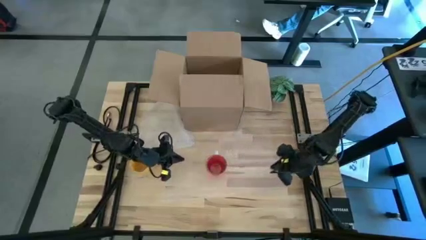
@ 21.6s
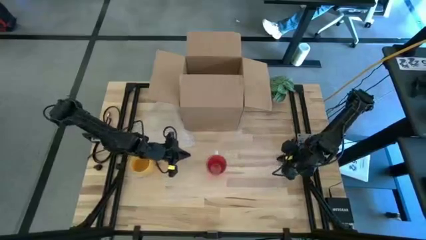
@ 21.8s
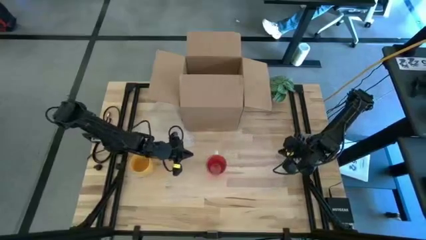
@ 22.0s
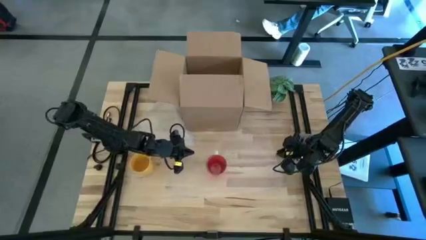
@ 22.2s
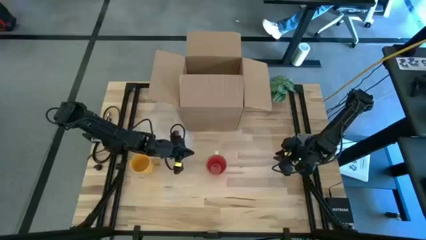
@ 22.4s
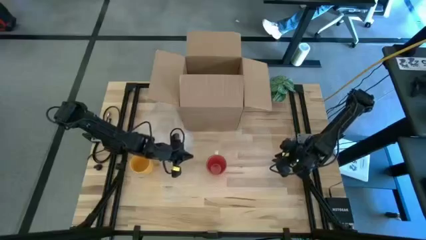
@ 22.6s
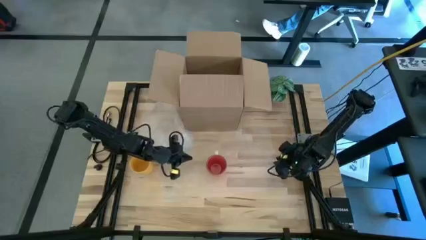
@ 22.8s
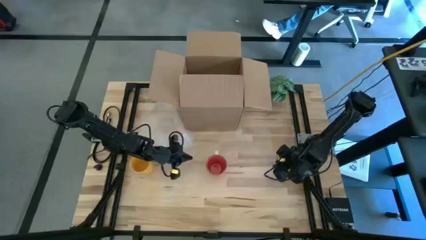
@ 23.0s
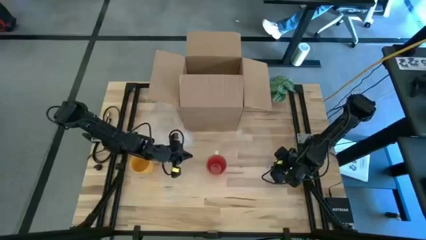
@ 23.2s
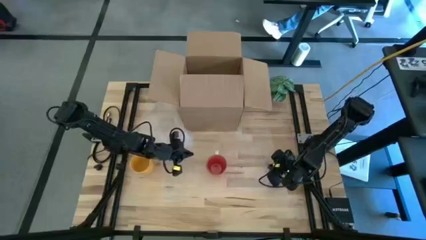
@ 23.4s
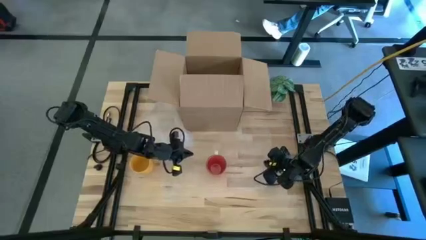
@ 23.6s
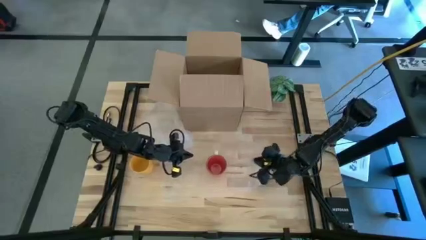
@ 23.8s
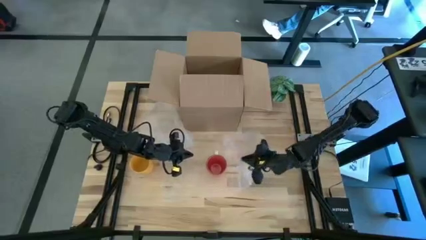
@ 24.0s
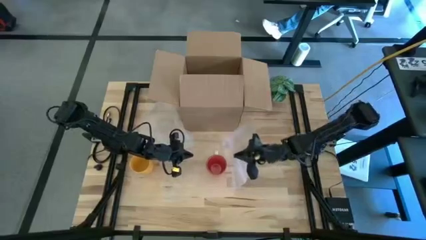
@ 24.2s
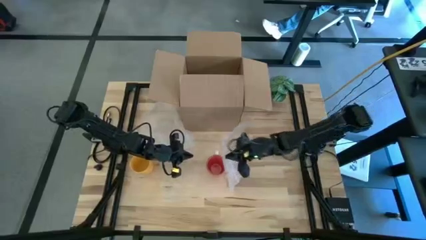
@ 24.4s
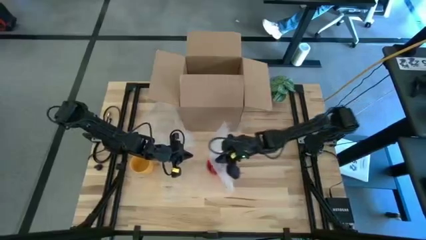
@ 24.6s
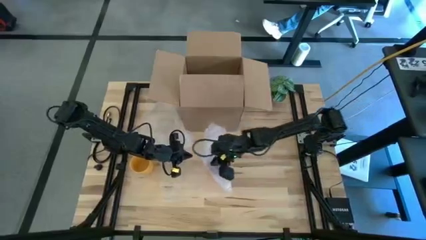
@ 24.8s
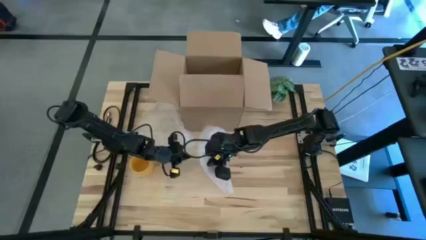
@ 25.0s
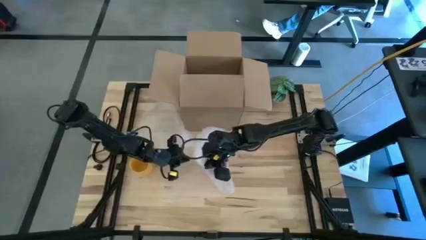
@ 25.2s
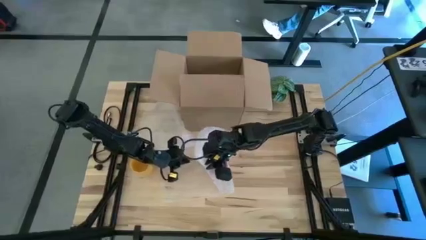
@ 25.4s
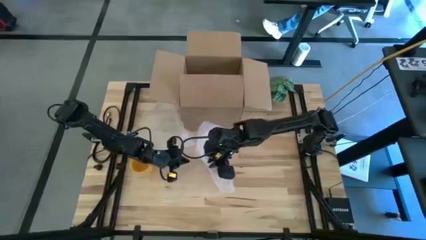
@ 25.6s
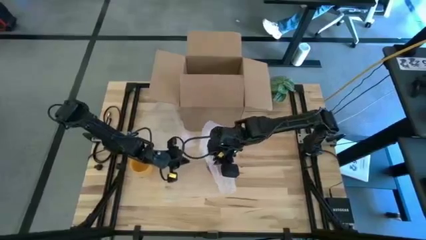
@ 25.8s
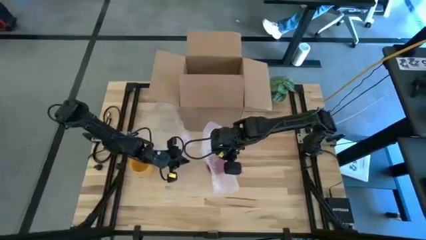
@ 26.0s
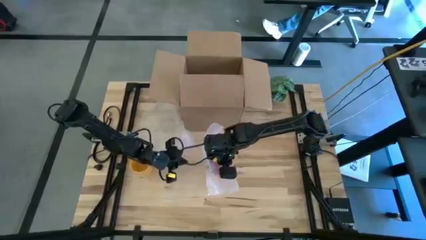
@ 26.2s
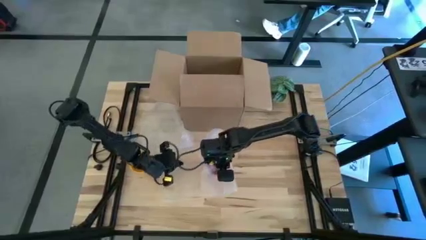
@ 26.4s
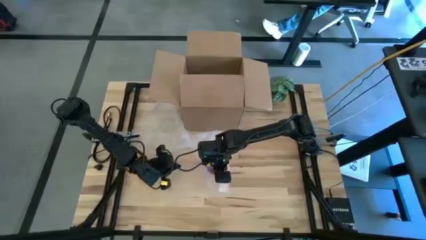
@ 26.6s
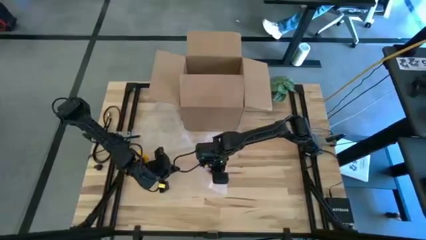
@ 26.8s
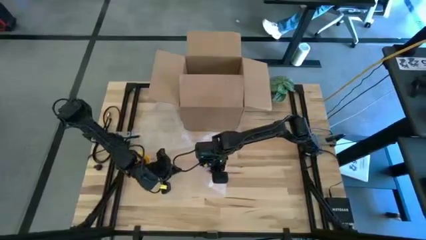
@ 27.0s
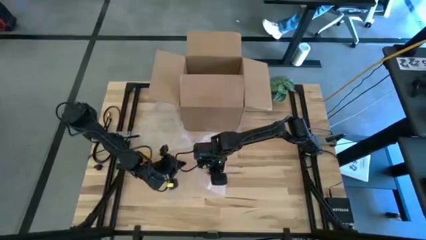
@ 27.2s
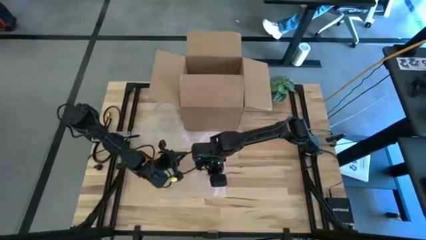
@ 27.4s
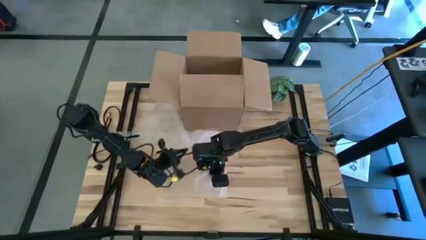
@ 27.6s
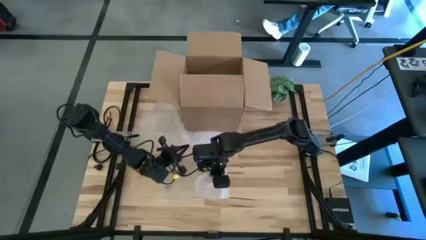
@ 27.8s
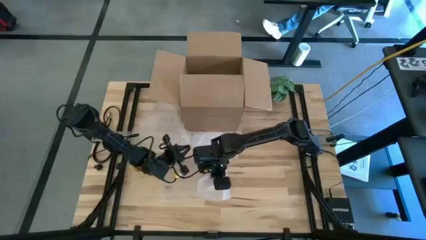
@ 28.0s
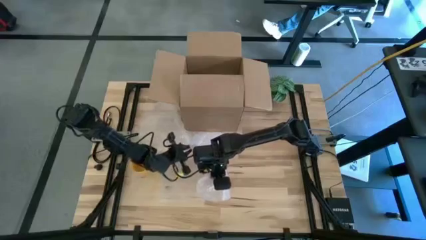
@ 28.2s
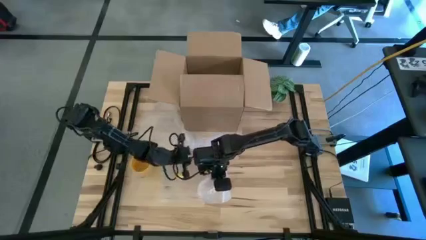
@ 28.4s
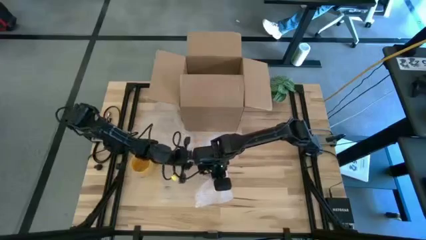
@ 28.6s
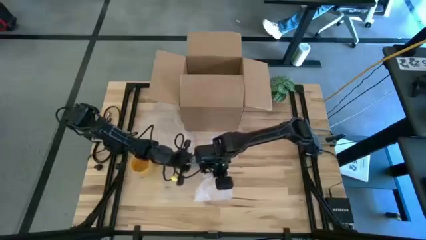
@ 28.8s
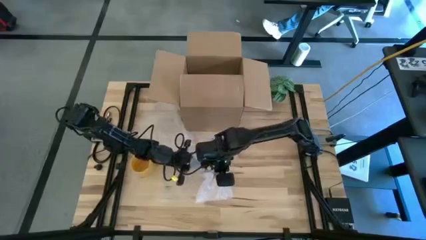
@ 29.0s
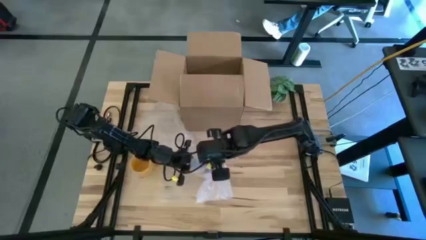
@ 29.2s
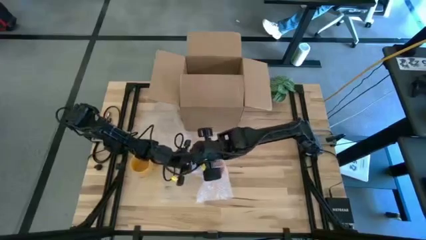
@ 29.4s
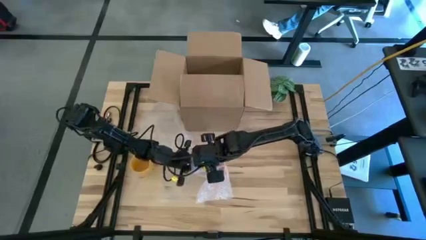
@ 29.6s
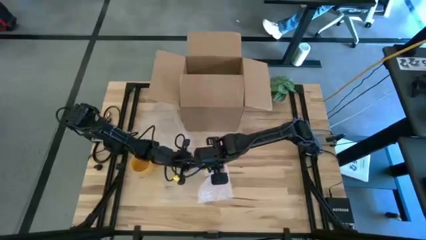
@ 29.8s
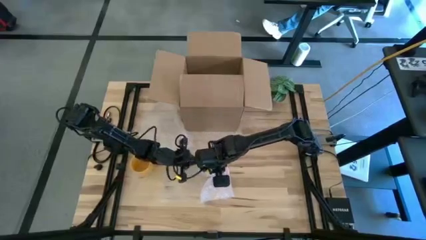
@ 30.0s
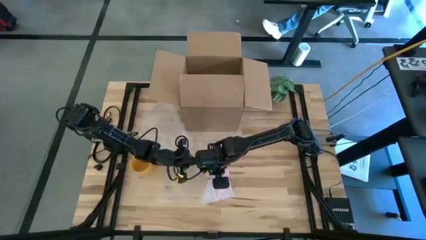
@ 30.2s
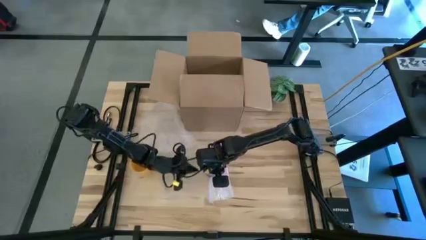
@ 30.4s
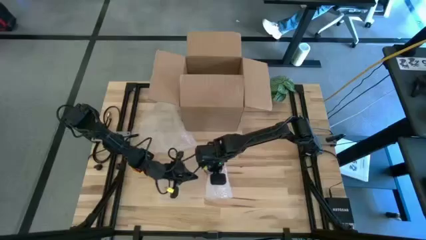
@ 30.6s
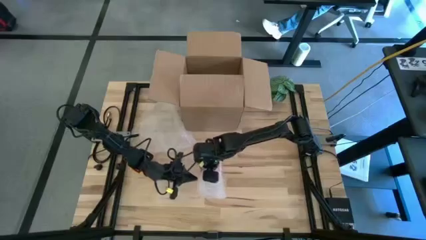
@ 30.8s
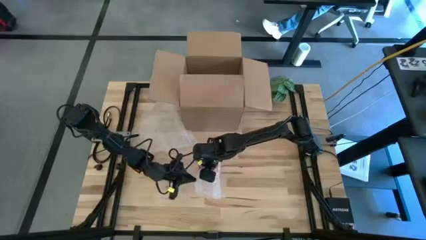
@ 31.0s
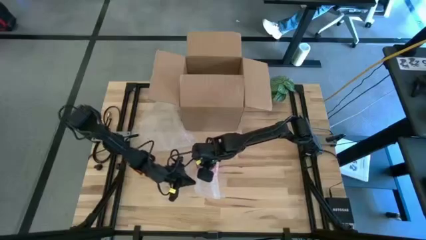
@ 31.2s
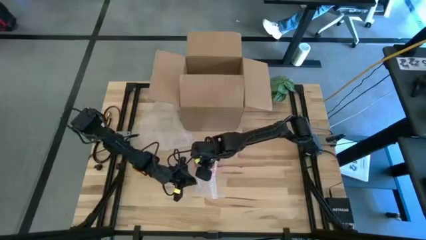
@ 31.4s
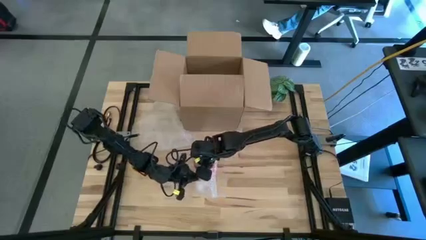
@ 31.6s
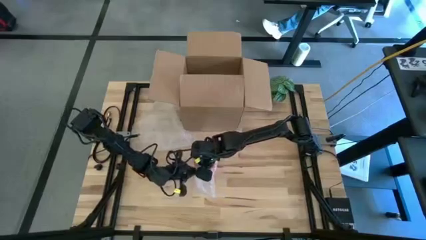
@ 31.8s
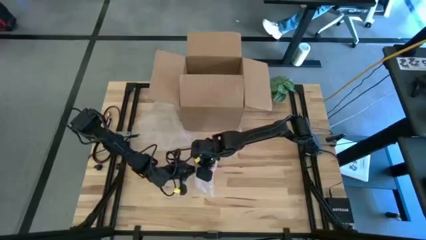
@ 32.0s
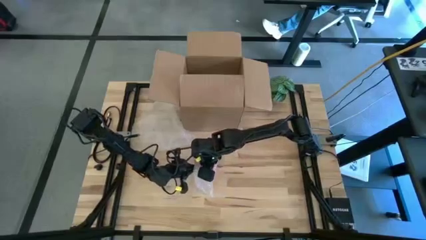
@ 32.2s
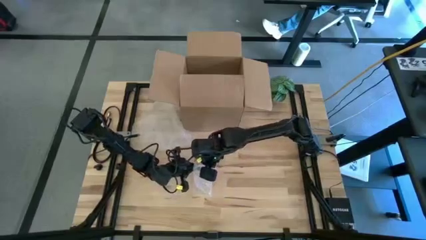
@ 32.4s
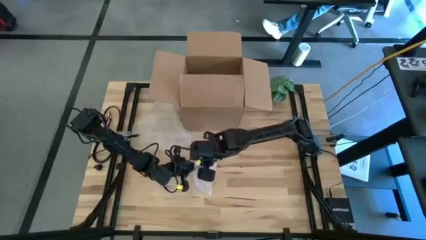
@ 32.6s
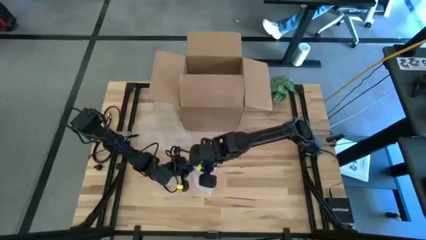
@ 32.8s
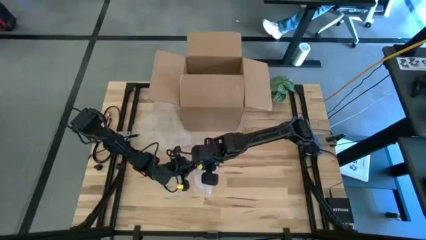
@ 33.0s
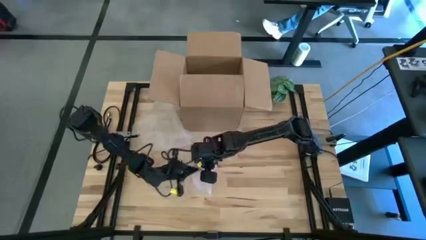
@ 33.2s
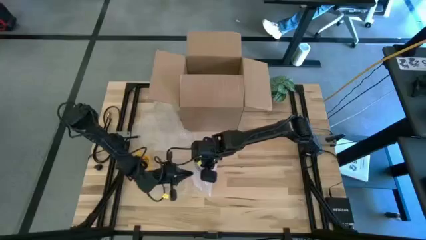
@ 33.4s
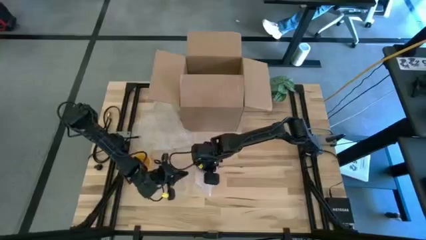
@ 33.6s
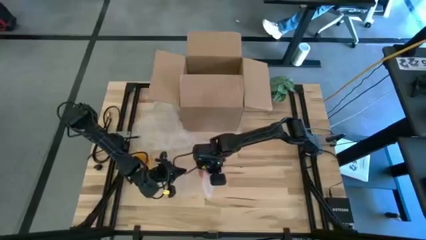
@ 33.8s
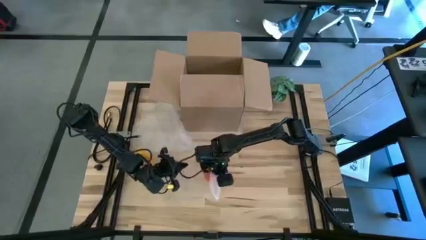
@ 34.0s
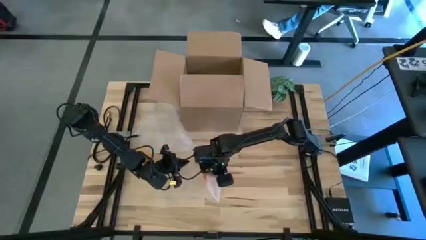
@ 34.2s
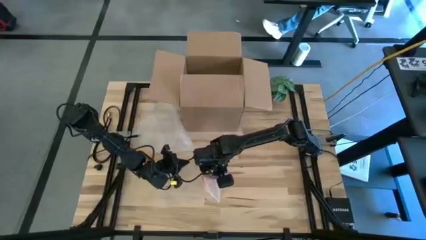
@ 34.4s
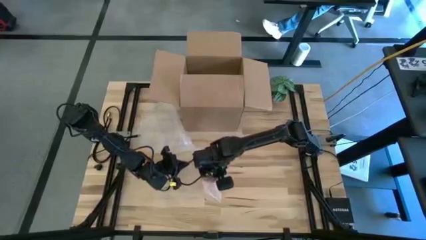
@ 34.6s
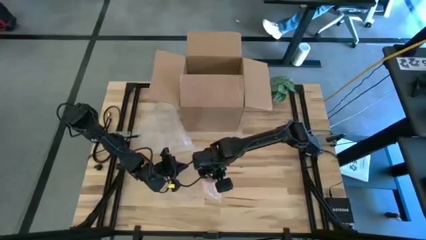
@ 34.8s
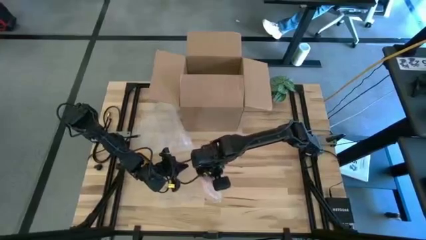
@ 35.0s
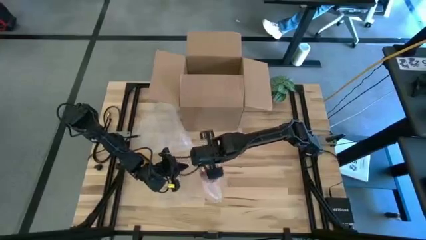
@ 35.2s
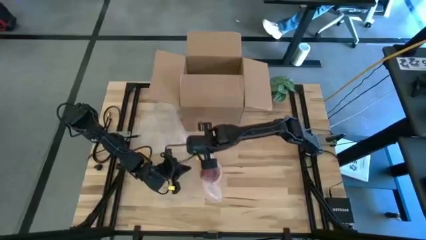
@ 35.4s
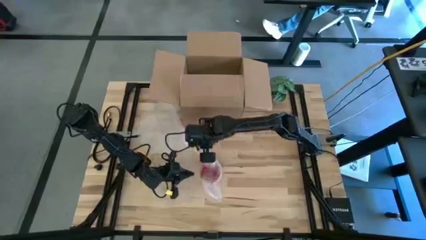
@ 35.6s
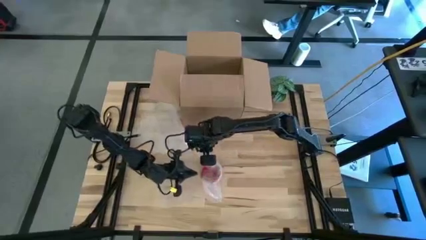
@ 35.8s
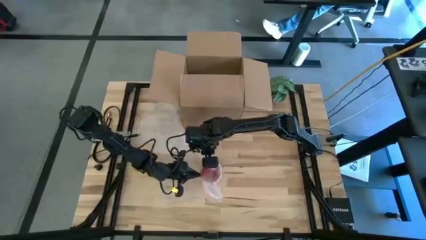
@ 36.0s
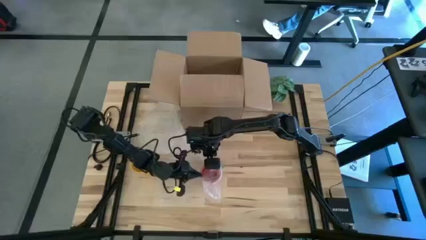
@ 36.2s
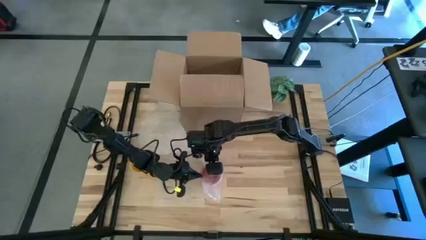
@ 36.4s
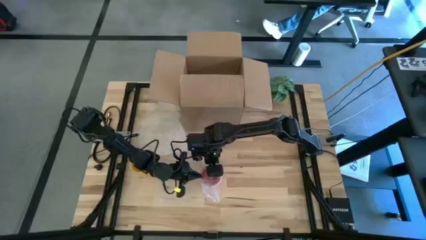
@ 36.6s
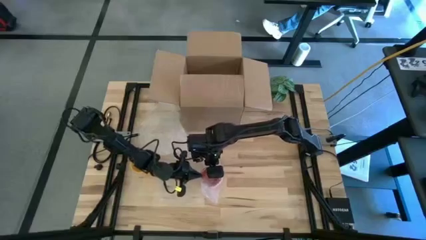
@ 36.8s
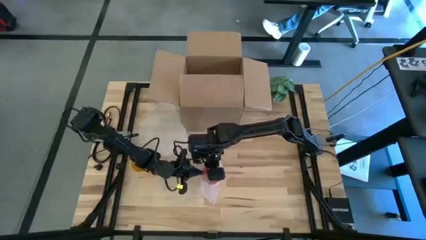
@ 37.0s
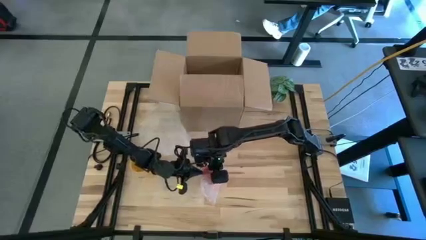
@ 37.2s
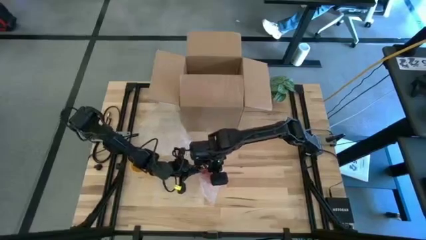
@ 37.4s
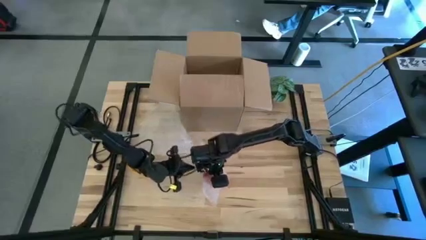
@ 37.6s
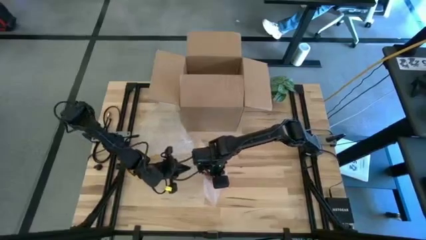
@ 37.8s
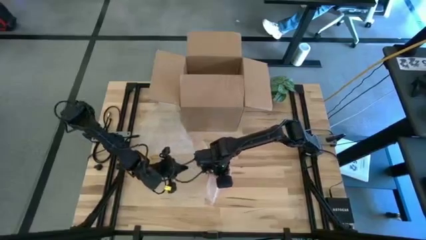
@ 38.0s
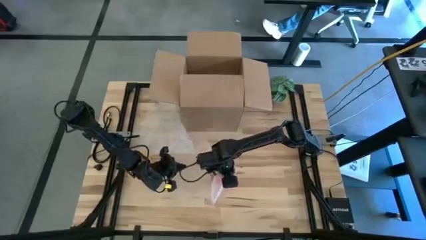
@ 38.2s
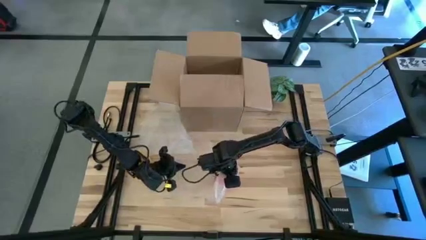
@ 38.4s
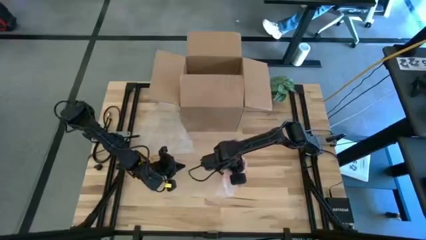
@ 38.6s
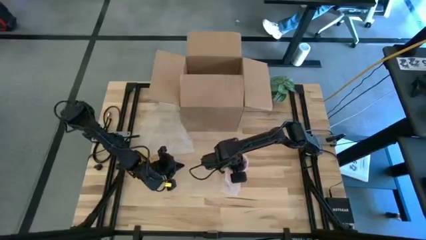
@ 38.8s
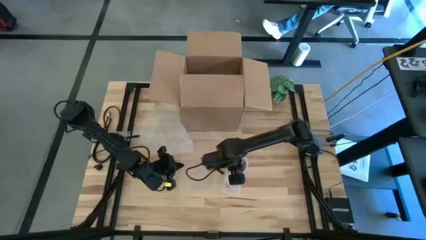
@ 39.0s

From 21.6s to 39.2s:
Task: wrap mug
Wrap the red mug with the bubble wrap
